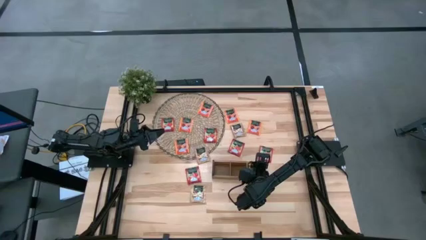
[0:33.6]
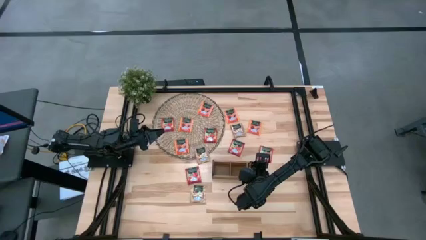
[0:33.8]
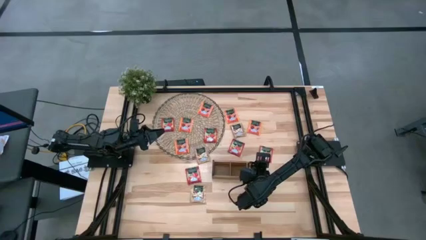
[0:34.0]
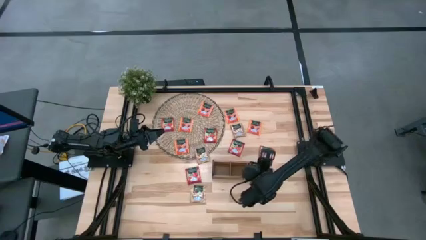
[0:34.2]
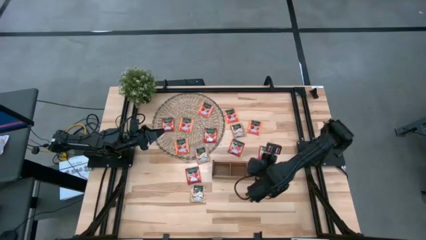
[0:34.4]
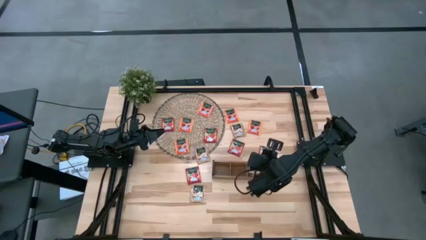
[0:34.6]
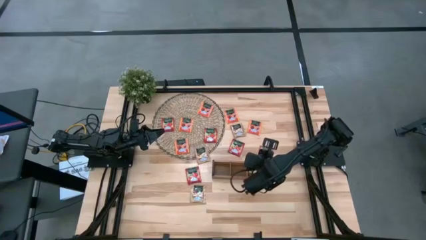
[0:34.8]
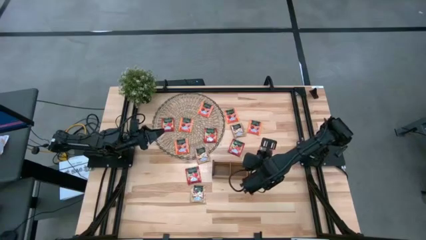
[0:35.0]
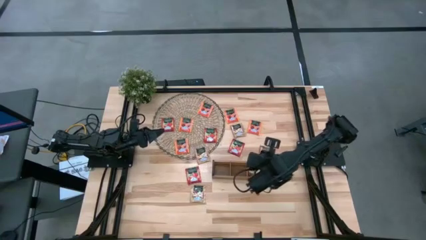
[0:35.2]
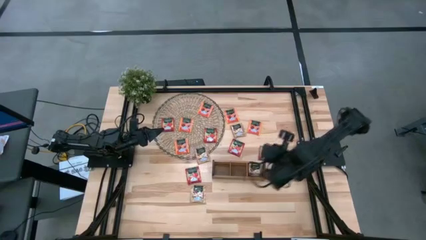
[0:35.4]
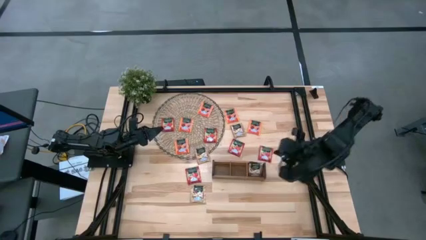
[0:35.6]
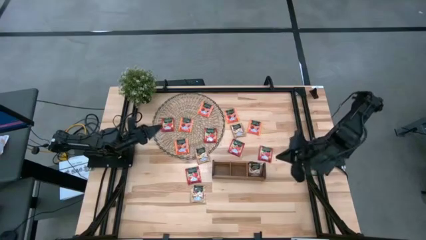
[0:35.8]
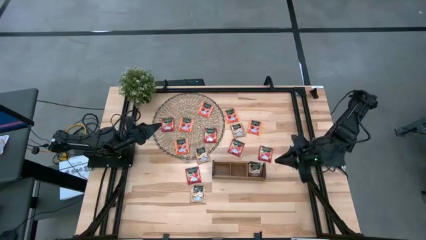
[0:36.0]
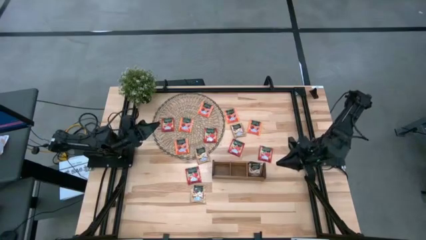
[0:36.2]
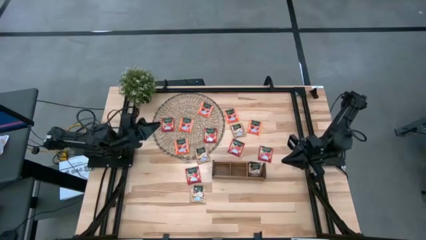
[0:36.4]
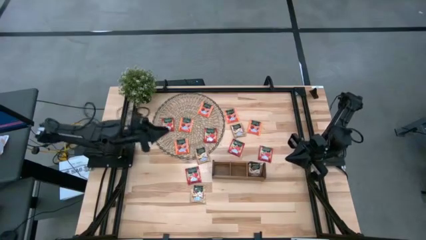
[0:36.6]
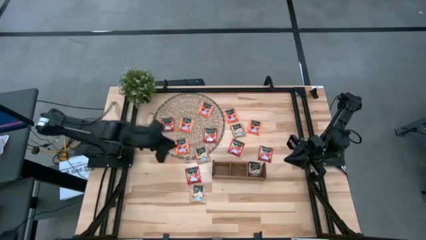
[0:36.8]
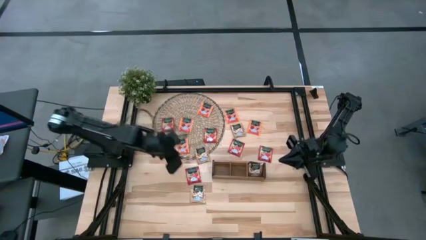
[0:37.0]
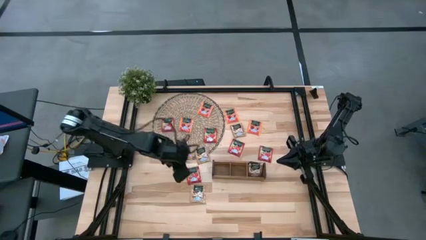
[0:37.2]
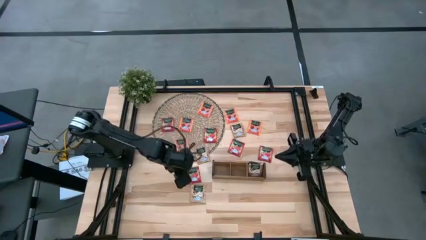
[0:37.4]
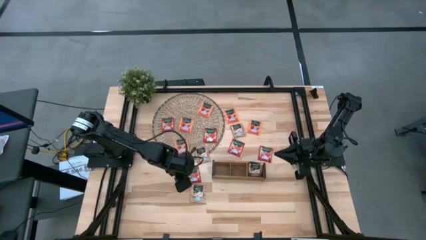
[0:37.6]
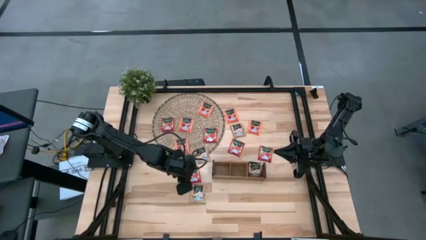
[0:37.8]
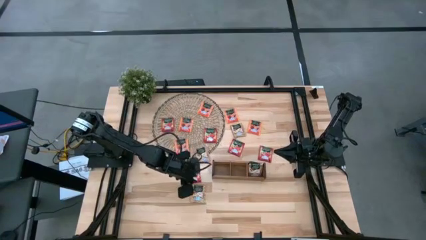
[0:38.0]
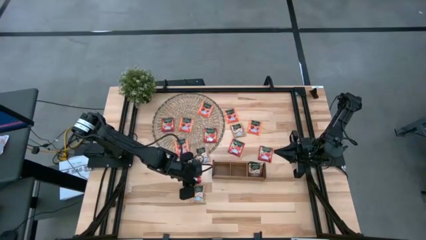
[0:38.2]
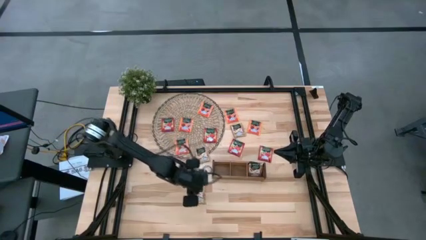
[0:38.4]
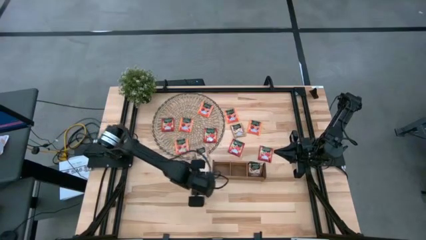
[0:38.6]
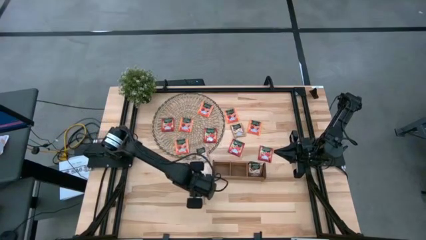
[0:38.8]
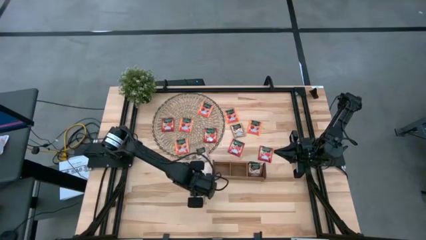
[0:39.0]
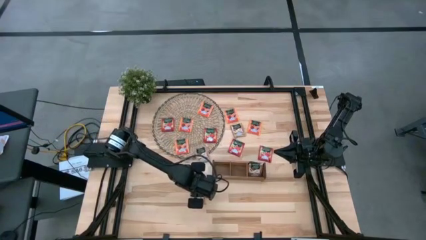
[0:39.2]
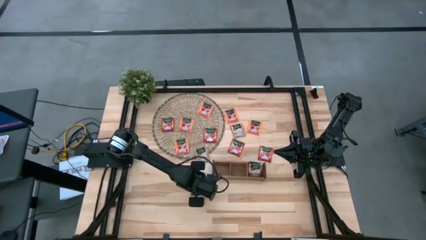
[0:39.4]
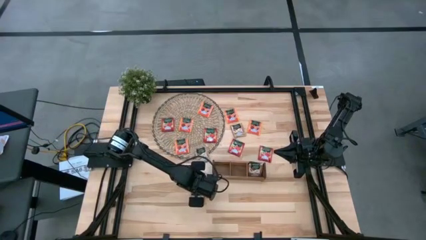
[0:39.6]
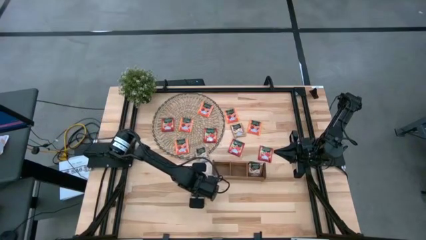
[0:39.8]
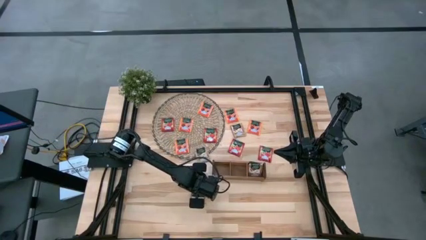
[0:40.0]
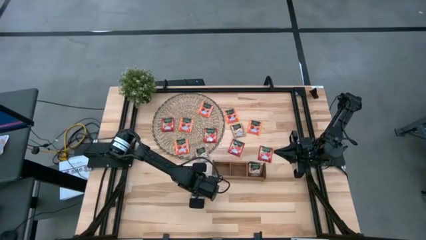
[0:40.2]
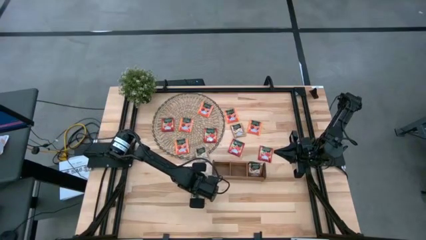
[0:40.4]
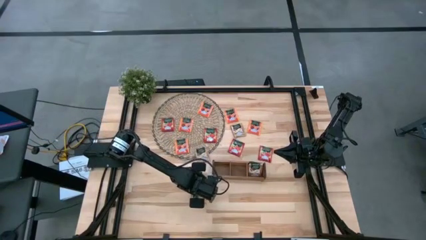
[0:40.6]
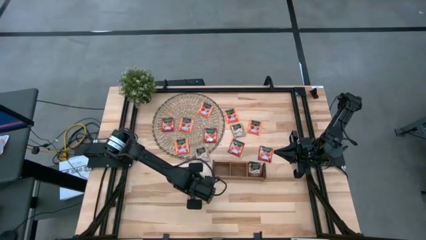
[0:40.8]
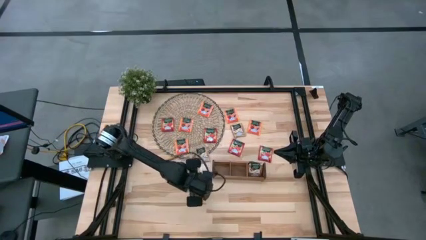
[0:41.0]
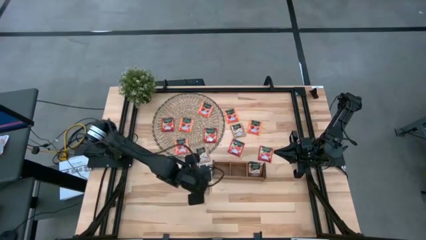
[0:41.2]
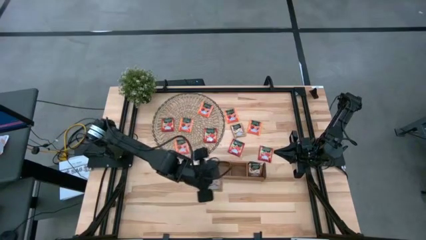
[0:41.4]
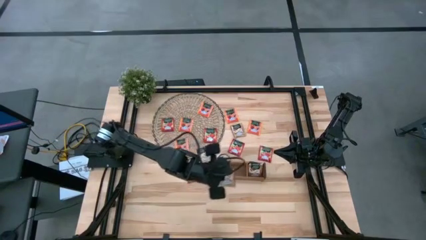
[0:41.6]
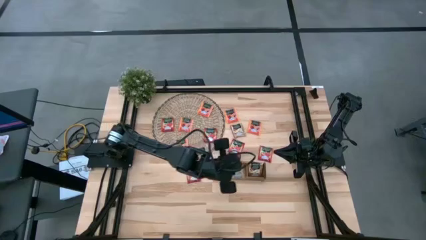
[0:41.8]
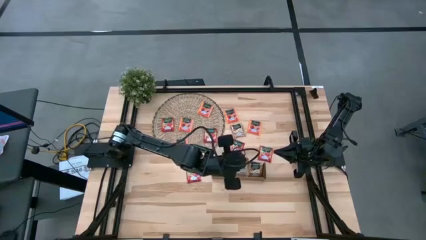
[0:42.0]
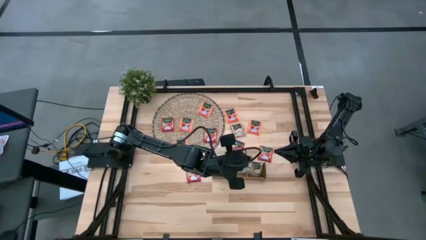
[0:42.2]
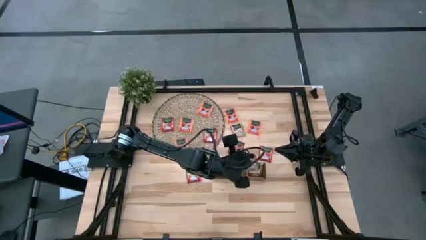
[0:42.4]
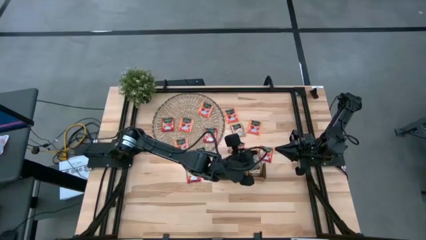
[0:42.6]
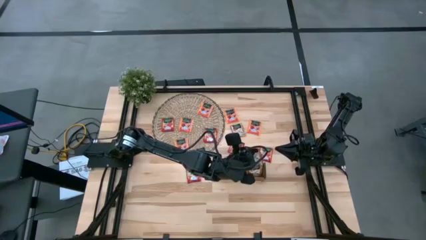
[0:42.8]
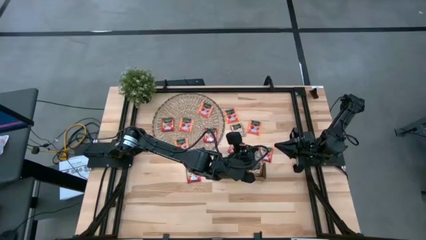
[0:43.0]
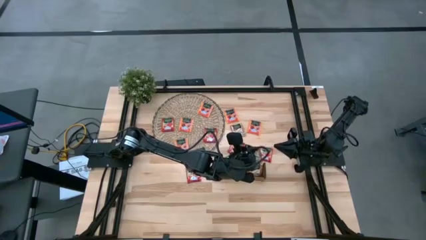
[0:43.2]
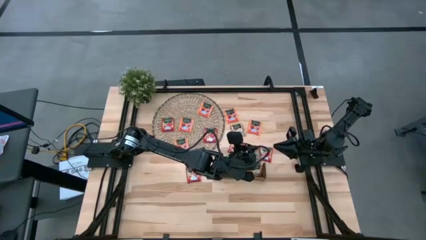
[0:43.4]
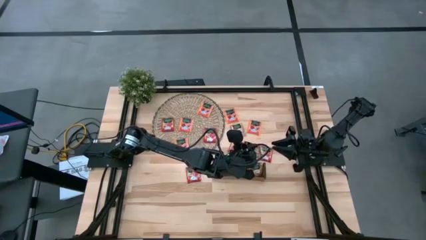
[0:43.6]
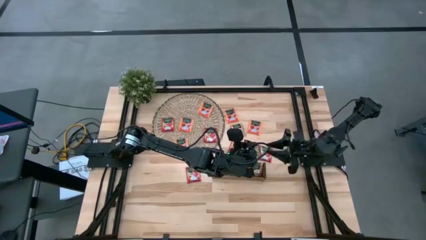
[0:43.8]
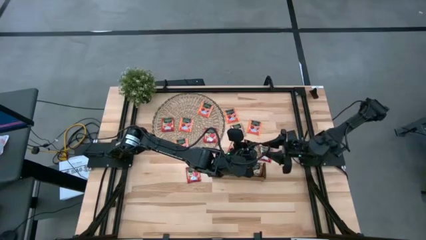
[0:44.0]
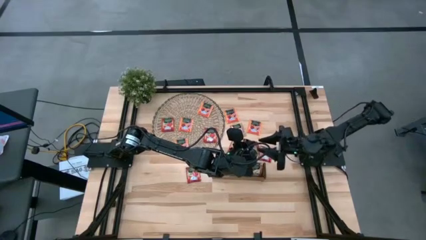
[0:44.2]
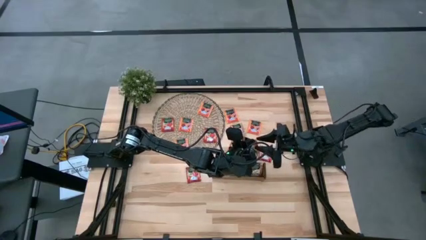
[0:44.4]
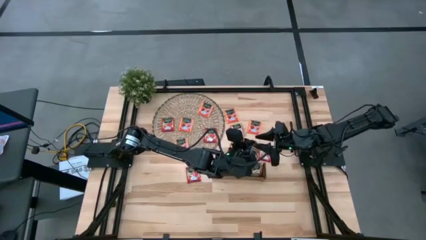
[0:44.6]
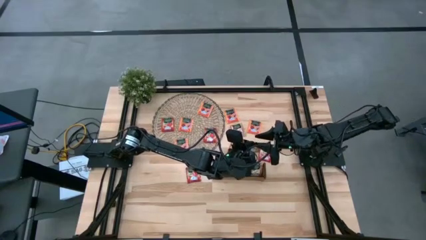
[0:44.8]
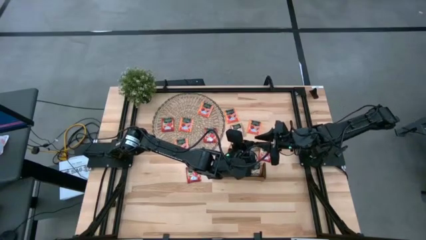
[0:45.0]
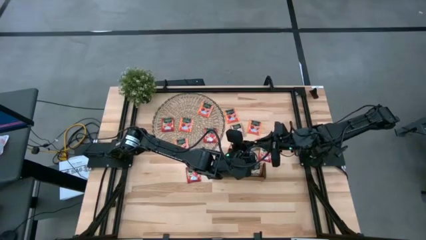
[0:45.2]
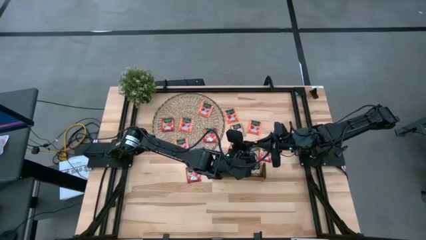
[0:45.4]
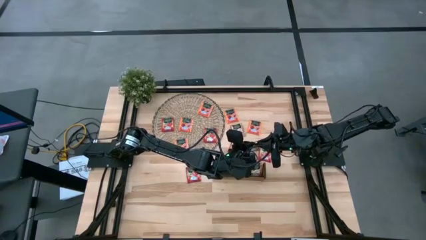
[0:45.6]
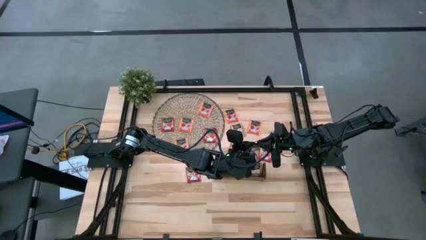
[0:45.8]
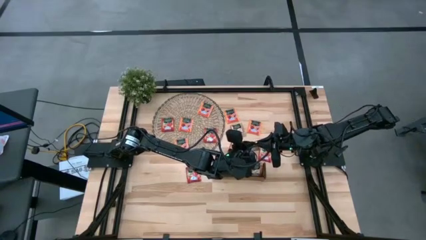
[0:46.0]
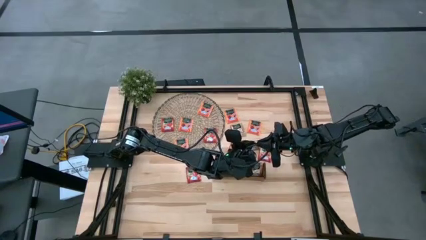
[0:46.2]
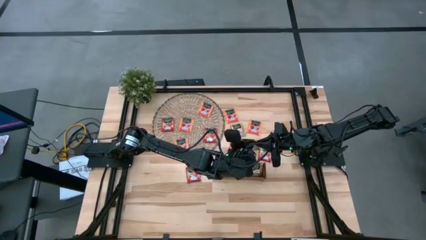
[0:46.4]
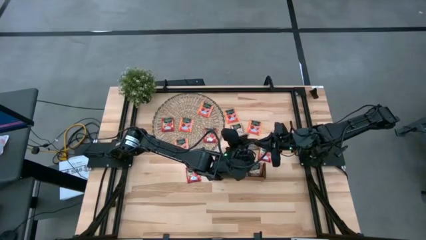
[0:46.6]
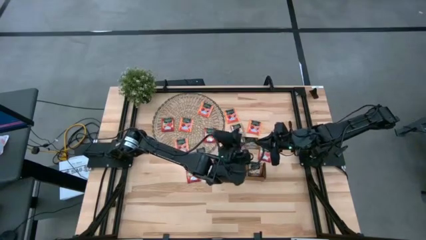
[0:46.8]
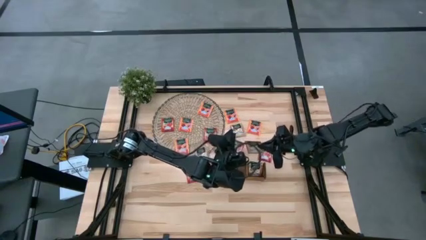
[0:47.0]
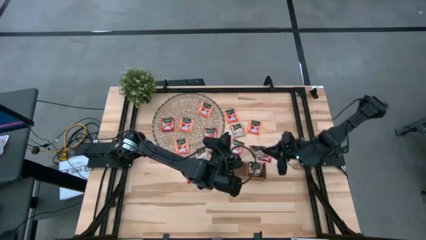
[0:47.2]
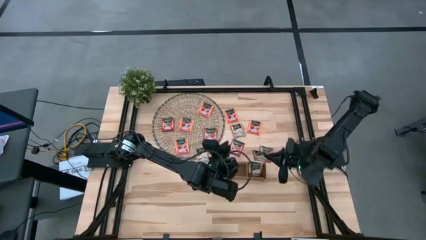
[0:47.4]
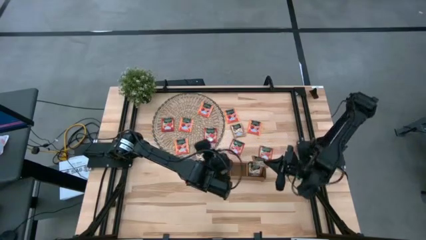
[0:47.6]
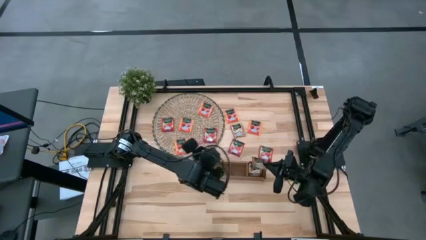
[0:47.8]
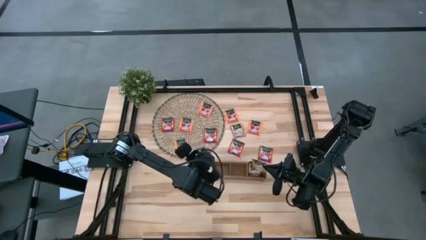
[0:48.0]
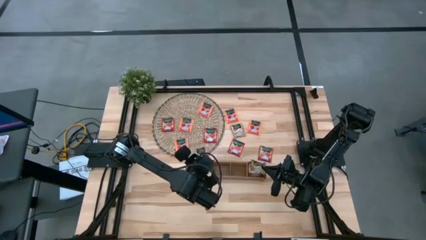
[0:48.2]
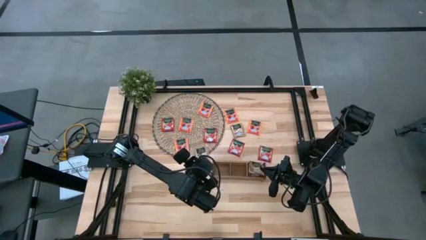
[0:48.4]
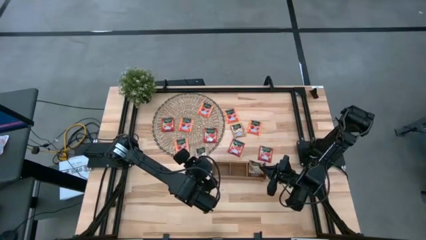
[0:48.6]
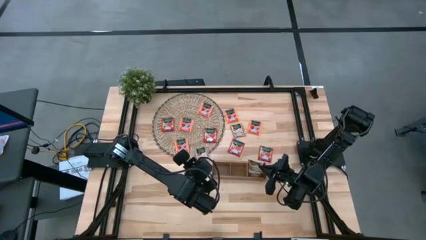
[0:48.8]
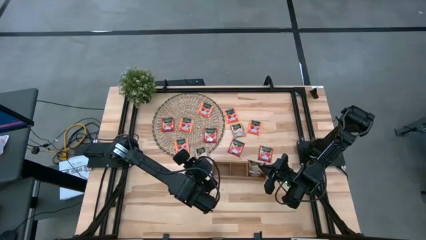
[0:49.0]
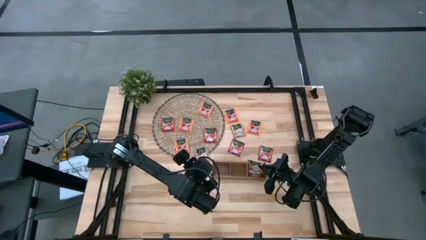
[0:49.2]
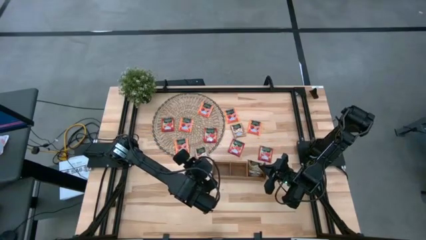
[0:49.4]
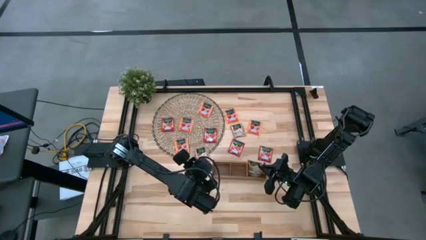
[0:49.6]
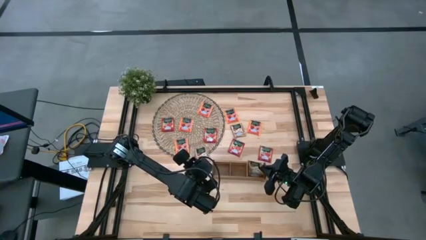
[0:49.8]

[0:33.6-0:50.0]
Task: Pick & Place Tea
Put the bottom brown tea bag into the right slot of the wooden organizer
